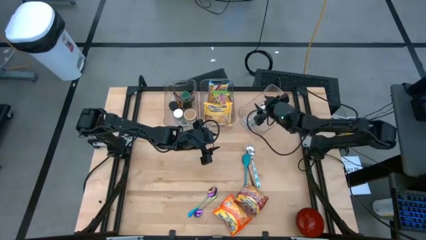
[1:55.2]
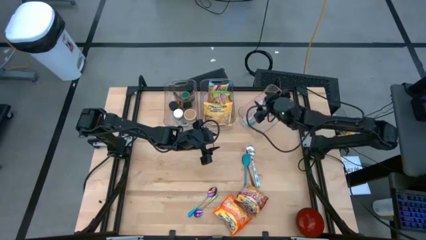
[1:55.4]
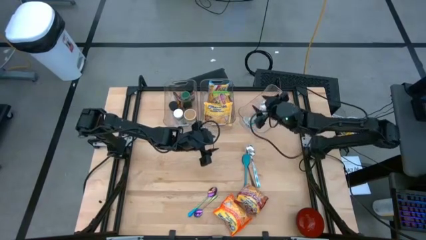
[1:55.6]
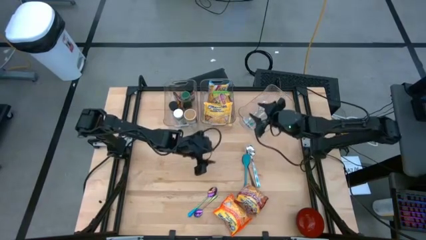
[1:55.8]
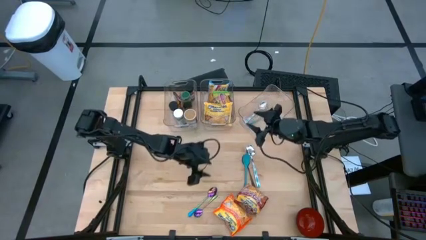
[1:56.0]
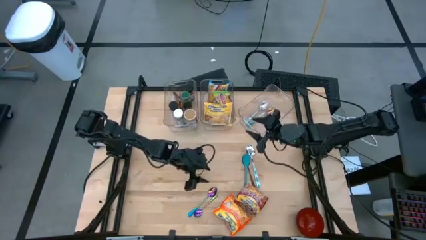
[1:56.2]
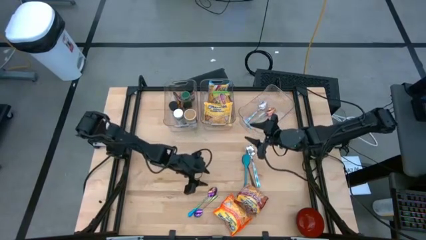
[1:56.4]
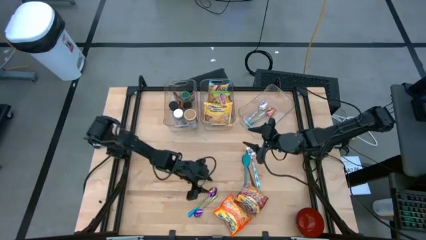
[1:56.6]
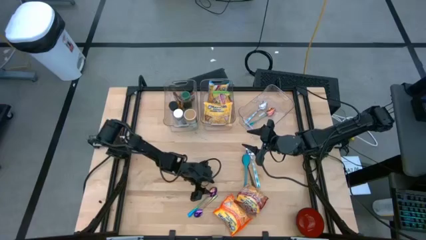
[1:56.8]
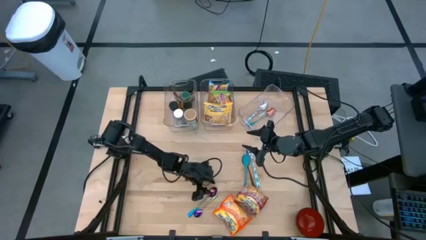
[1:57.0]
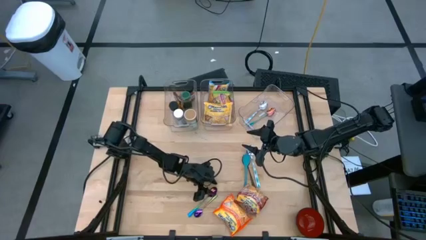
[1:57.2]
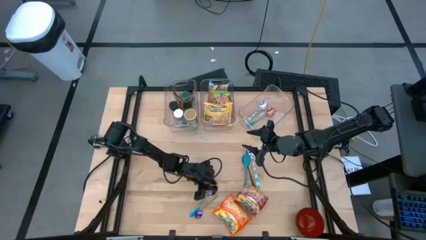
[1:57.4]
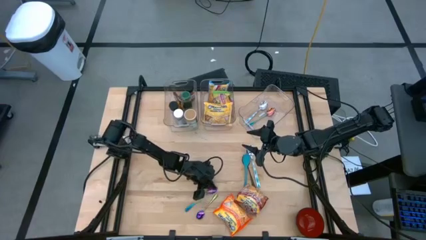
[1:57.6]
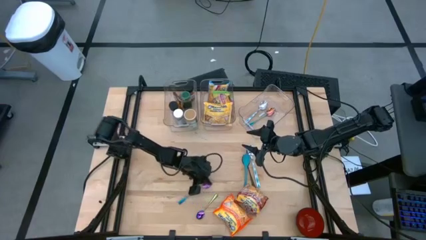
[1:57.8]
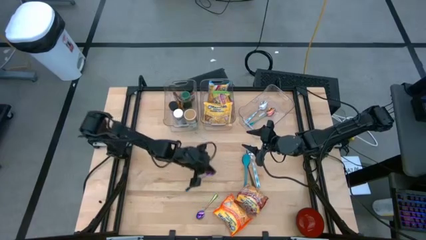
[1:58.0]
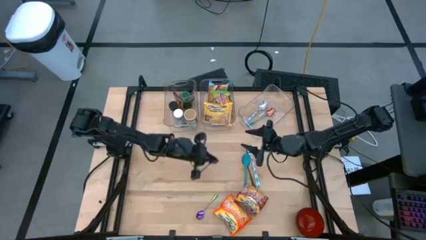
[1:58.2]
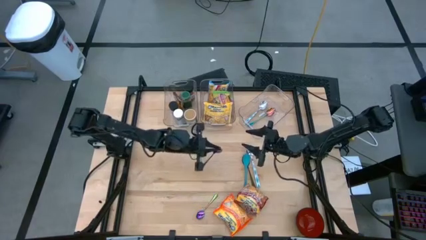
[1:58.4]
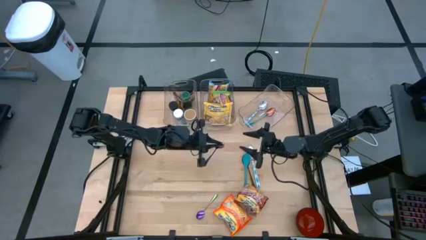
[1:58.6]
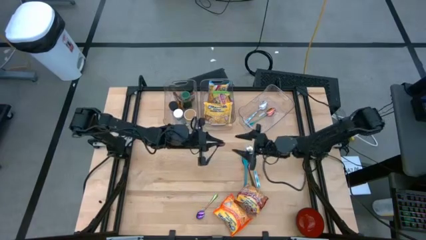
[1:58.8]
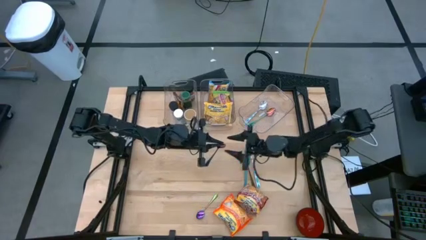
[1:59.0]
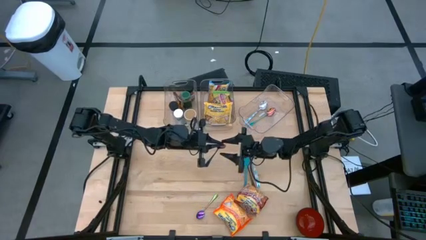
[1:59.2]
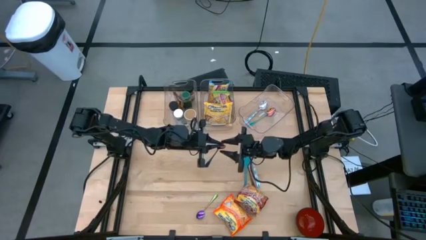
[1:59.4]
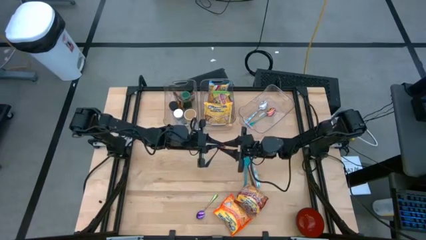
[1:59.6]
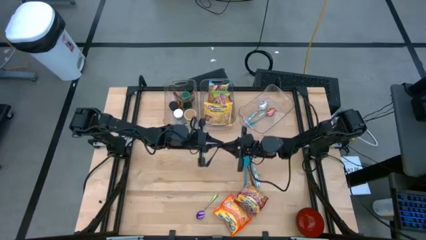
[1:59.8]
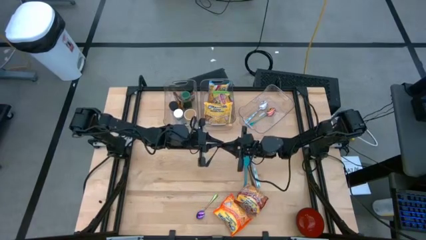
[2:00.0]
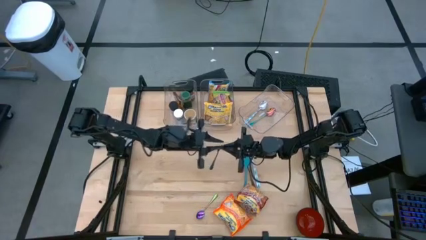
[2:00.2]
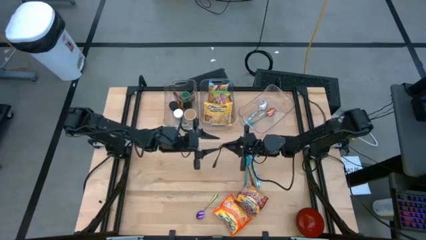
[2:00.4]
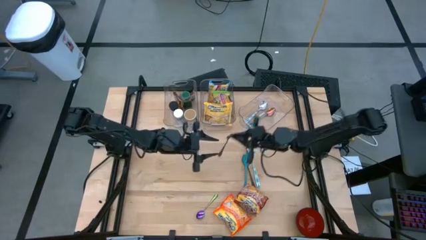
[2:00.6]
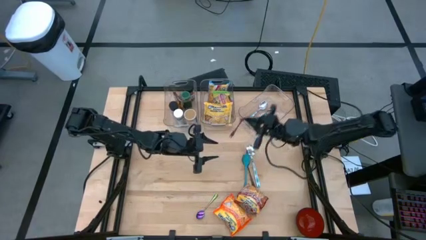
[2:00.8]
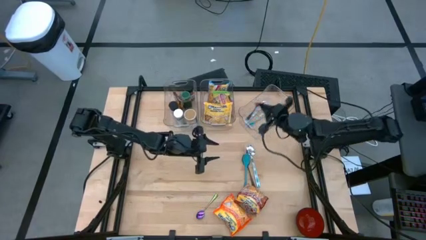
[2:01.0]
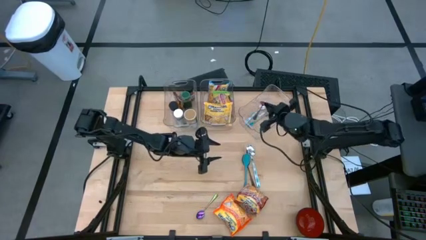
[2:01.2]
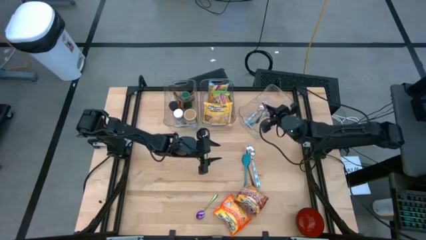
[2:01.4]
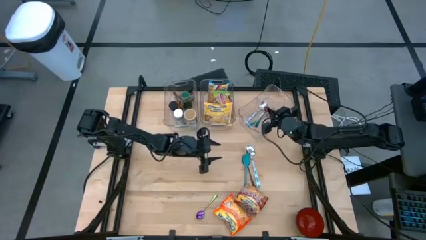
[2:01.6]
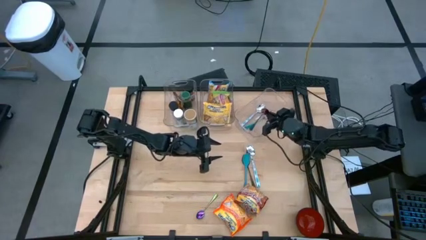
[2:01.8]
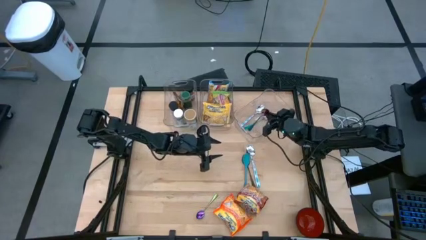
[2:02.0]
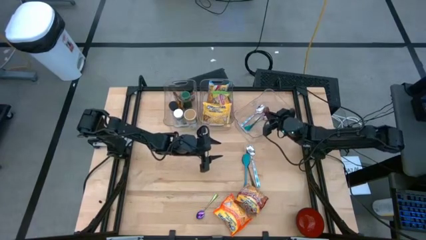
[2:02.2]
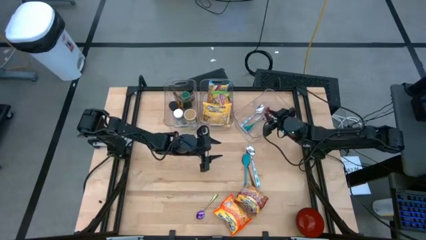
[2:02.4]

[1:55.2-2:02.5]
Task: Pick & Place Food Item
Put the blue spoon into the right transparent bin

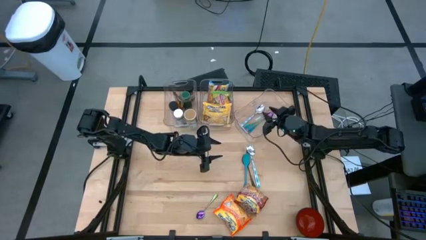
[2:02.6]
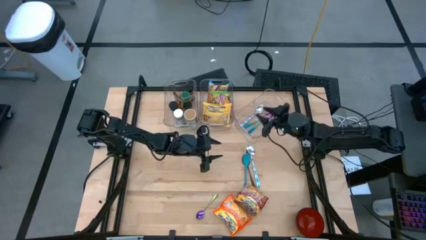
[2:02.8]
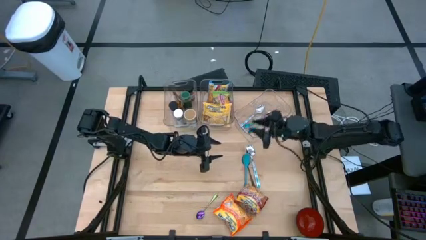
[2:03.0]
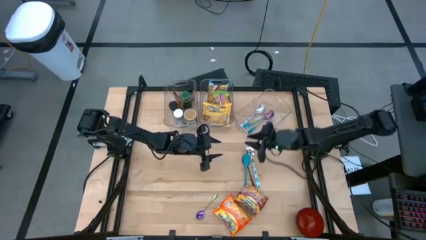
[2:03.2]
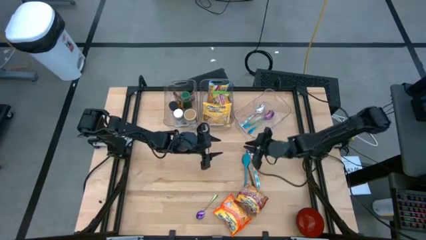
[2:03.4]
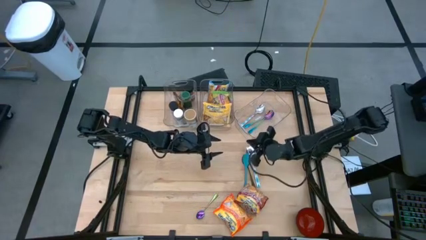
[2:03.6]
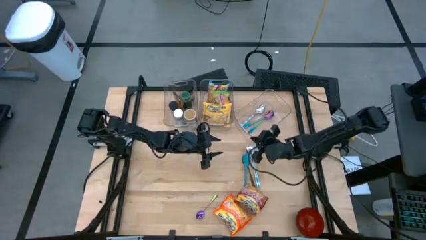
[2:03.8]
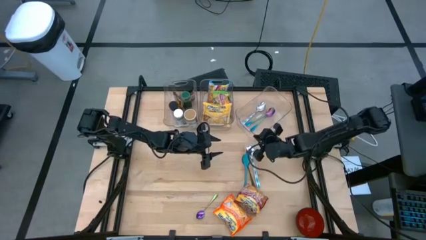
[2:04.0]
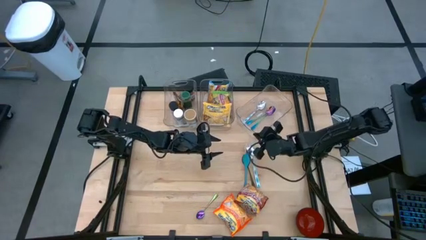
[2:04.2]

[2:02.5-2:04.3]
Adjust the right transparent bin

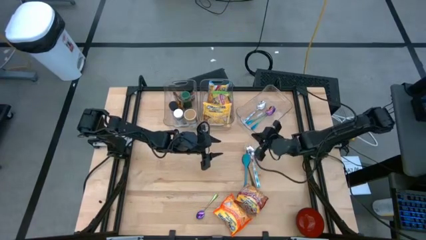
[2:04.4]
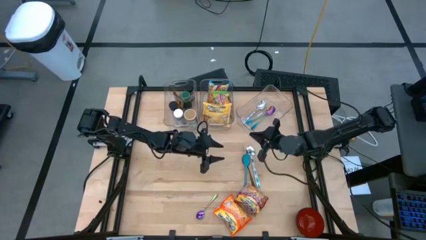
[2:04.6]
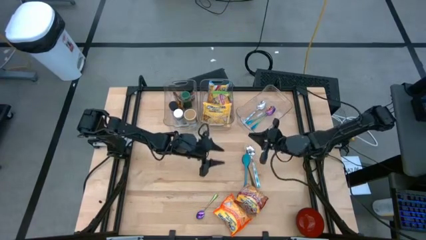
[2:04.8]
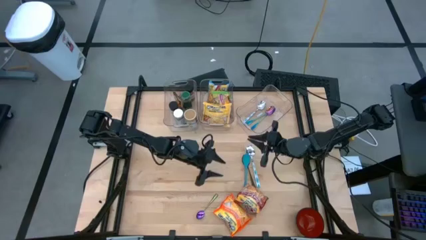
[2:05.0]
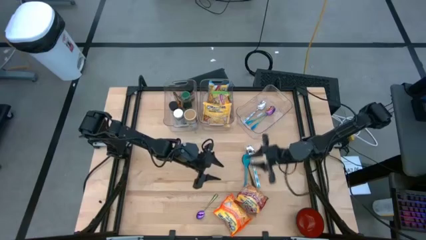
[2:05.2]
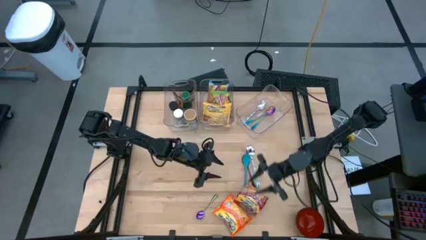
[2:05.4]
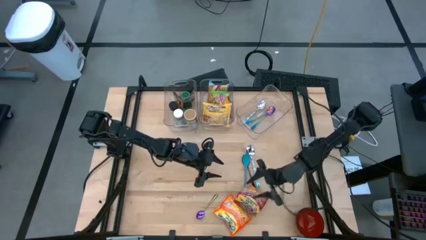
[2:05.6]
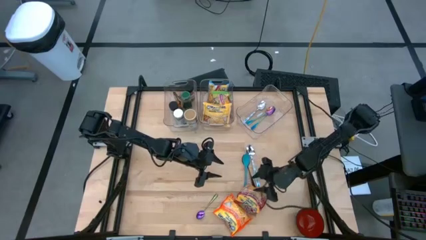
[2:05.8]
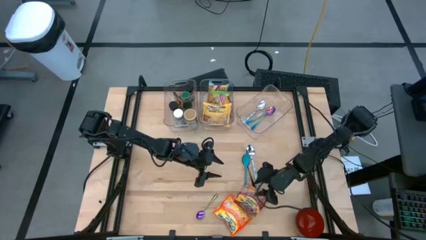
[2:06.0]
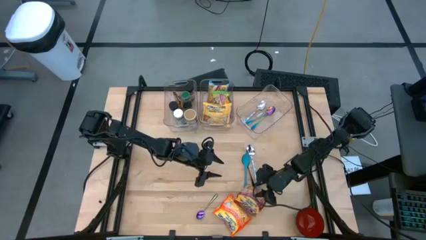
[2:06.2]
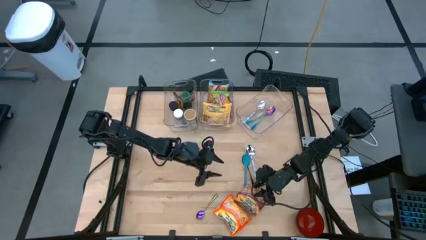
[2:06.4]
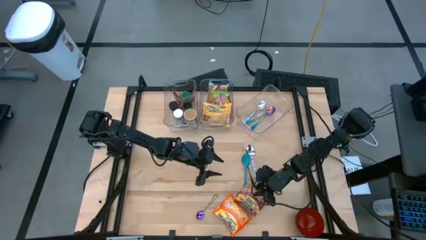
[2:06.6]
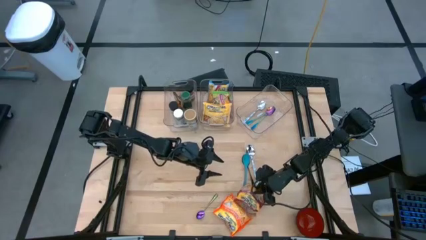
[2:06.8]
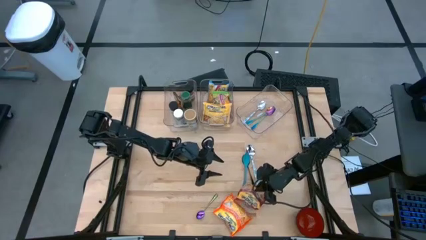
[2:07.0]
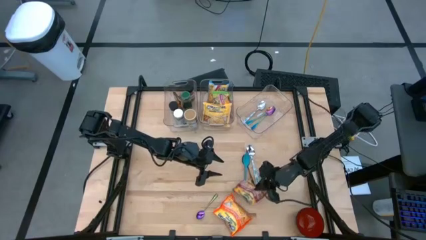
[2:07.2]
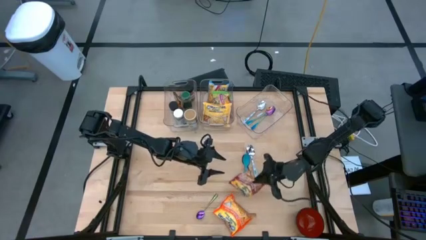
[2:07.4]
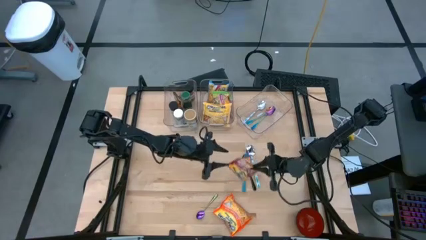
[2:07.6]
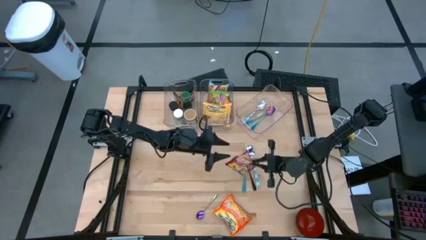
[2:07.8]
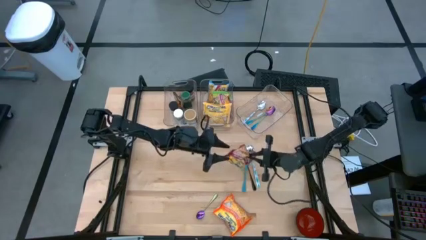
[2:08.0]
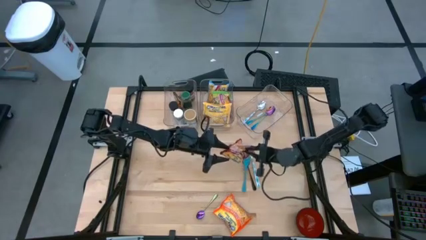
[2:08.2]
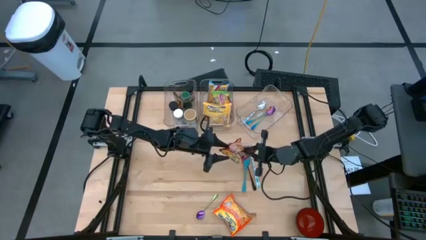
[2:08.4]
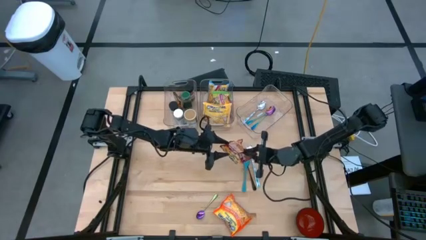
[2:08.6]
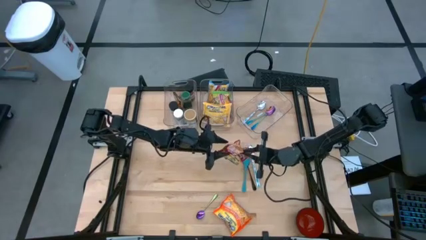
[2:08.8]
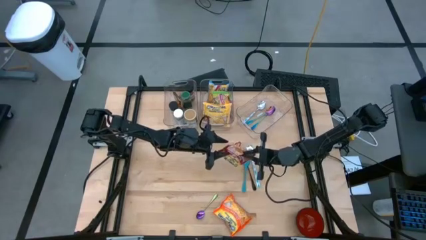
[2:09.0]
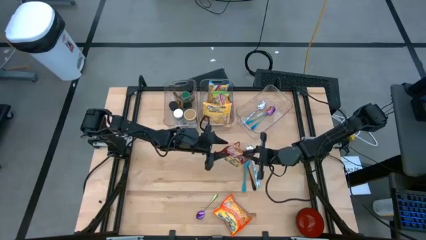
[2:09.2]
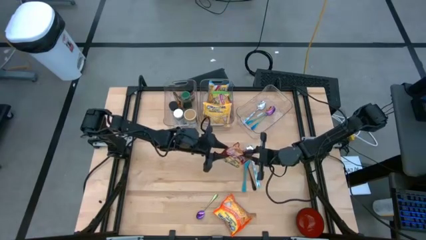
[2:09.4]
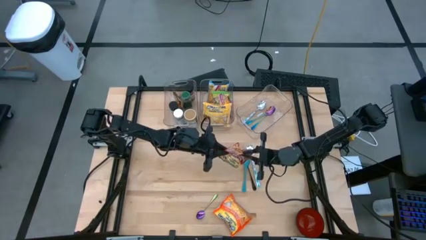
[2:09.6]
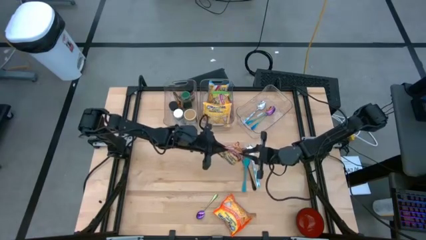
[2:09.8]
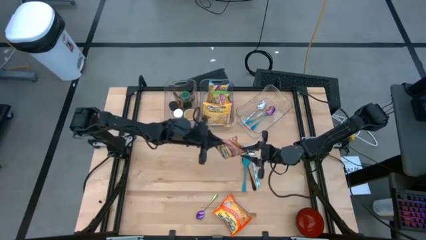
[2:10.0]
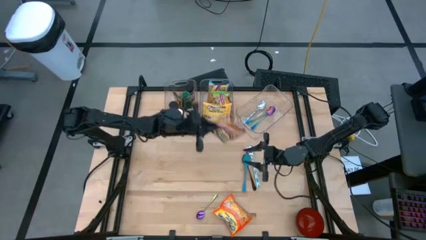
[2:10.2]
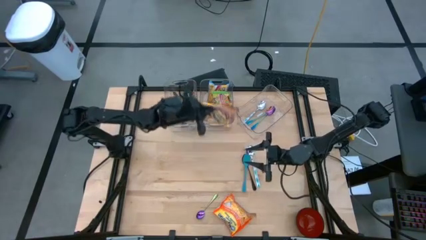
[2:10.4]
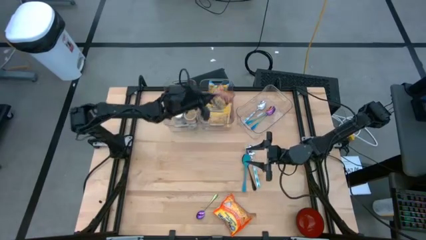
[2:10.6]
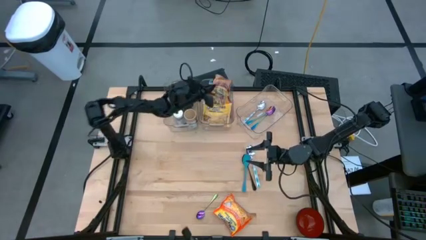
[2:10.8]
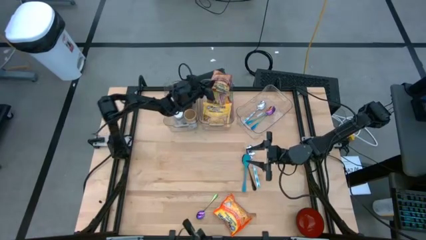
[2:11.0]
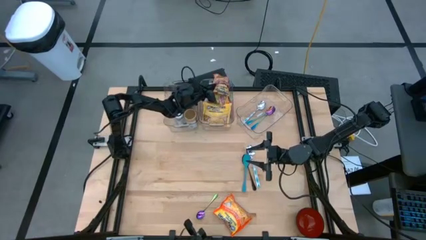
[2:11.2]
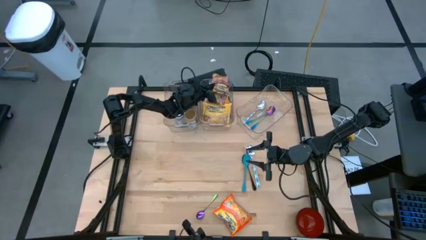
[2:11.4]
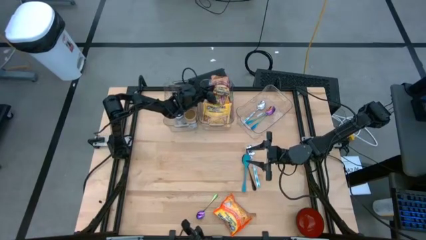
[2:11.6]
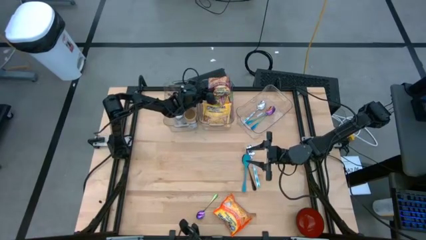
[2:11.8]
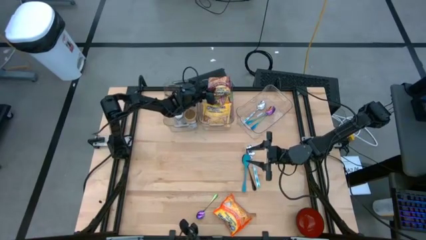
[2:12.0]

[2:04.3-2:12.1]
Put the red noodle pack into the middle transparent bin
